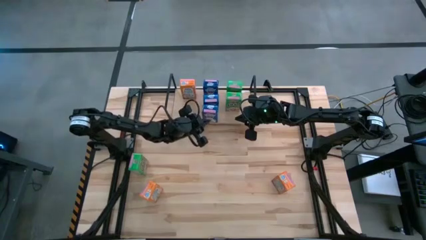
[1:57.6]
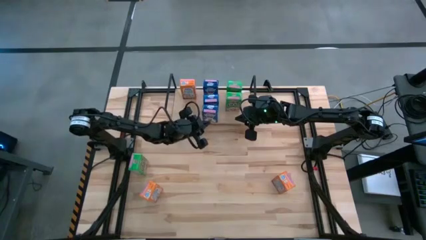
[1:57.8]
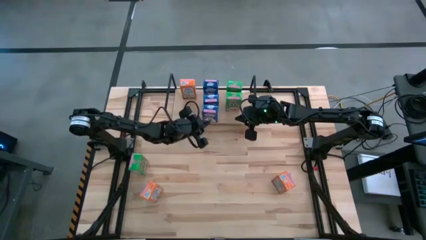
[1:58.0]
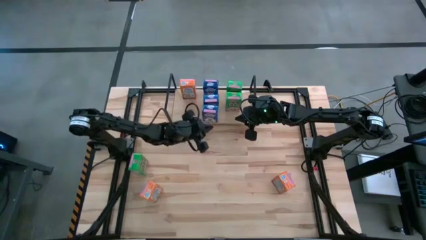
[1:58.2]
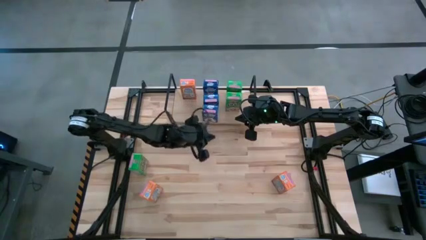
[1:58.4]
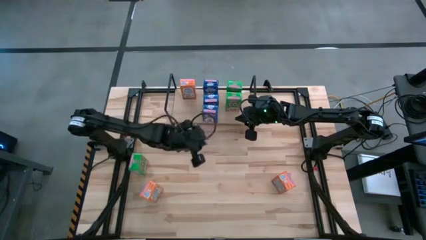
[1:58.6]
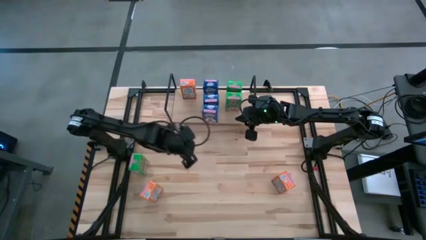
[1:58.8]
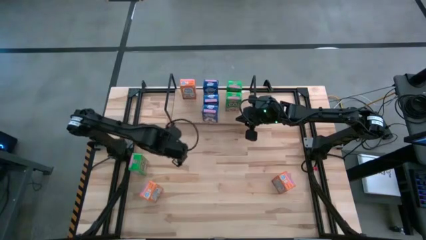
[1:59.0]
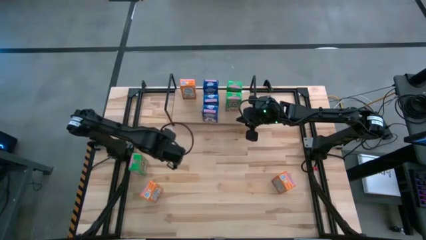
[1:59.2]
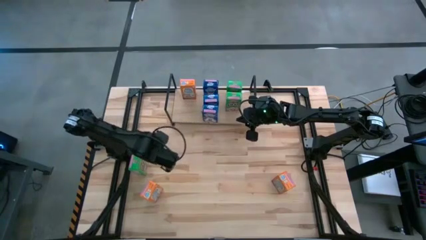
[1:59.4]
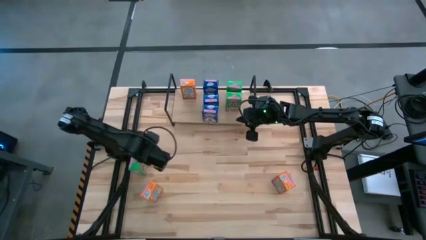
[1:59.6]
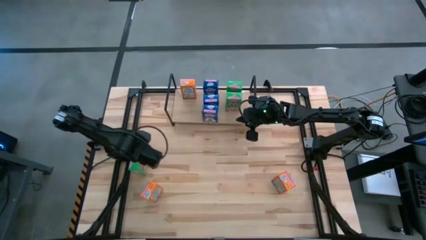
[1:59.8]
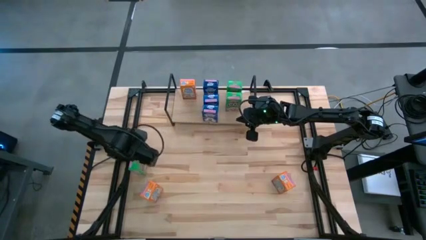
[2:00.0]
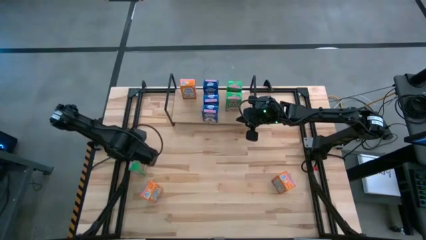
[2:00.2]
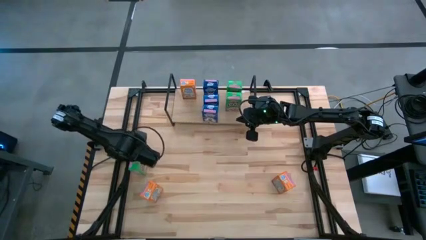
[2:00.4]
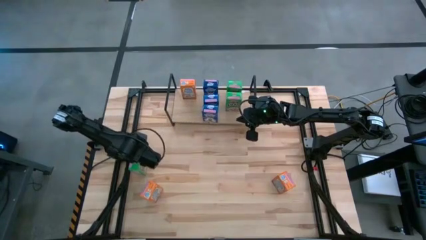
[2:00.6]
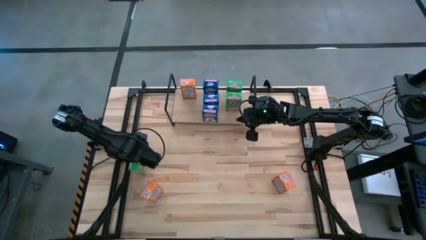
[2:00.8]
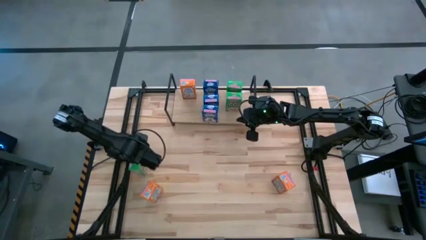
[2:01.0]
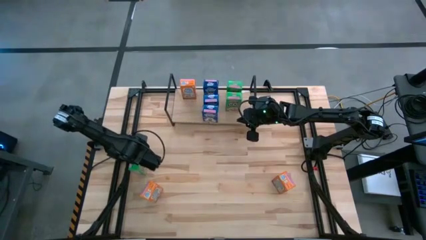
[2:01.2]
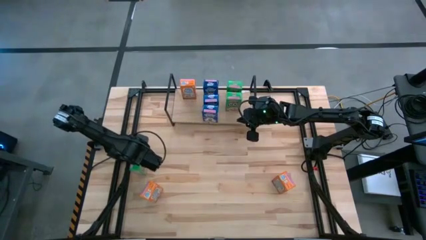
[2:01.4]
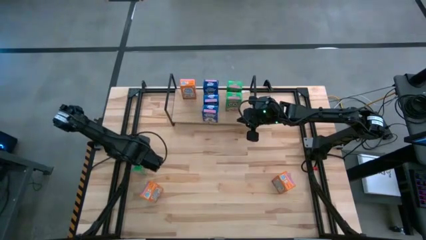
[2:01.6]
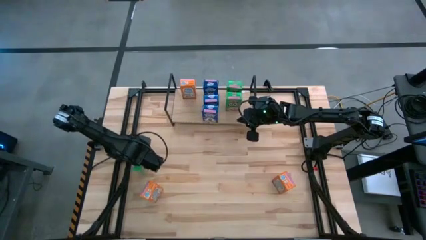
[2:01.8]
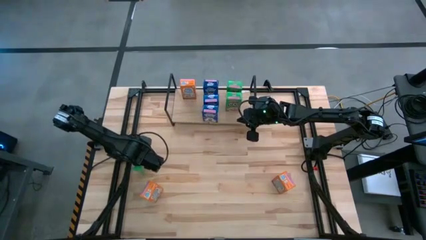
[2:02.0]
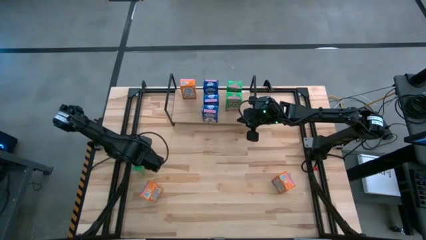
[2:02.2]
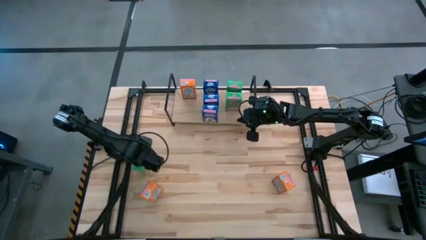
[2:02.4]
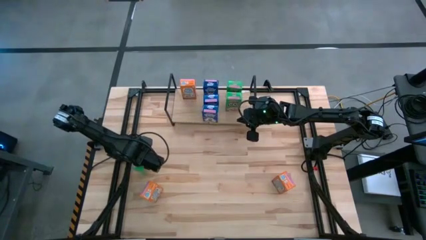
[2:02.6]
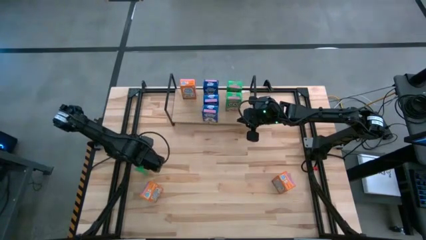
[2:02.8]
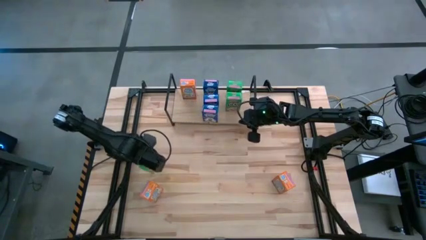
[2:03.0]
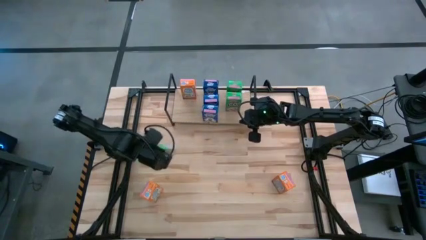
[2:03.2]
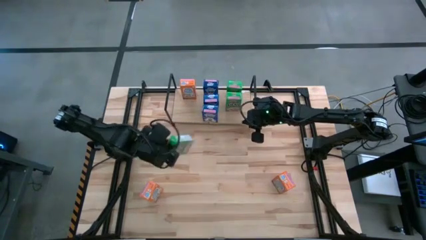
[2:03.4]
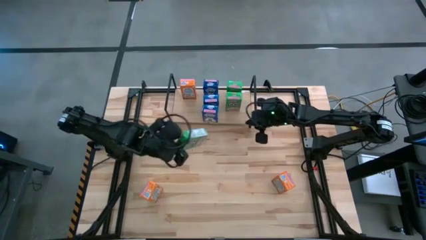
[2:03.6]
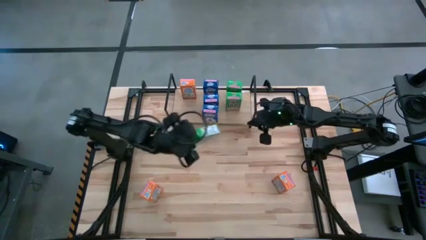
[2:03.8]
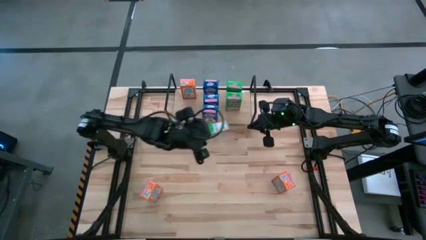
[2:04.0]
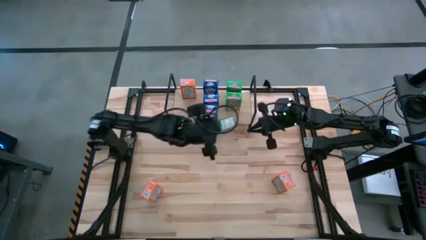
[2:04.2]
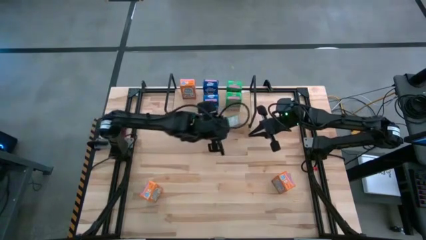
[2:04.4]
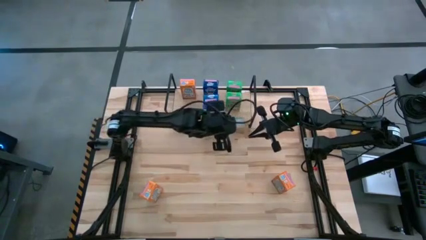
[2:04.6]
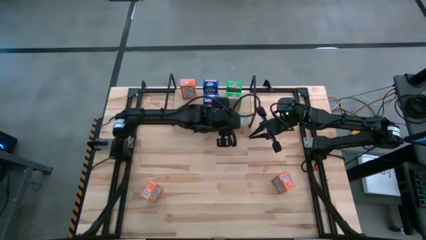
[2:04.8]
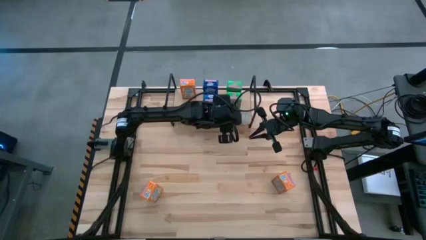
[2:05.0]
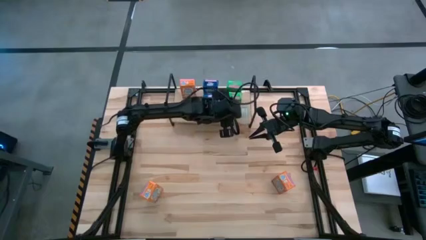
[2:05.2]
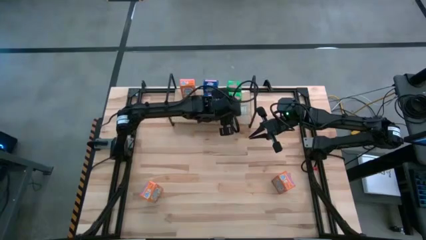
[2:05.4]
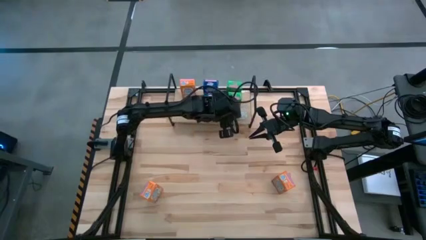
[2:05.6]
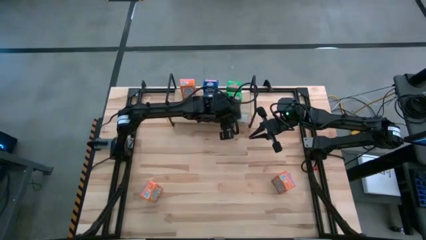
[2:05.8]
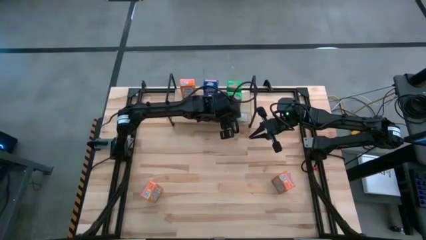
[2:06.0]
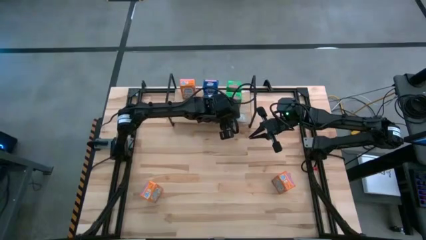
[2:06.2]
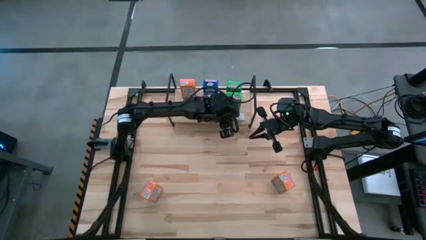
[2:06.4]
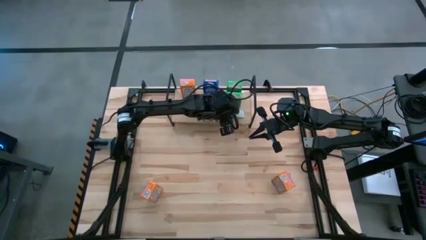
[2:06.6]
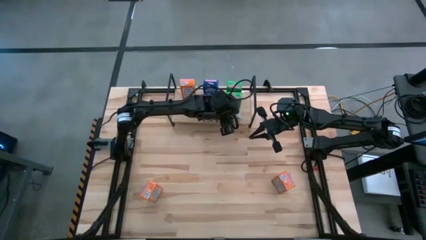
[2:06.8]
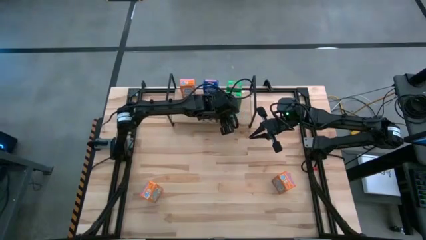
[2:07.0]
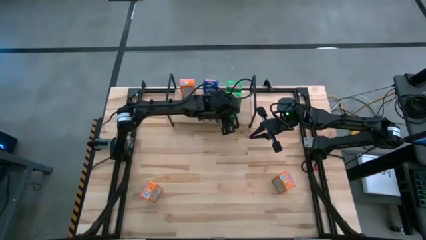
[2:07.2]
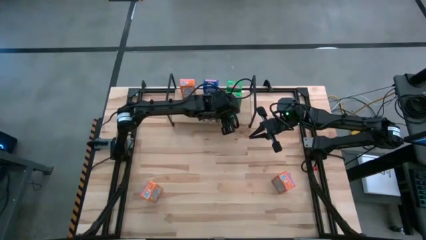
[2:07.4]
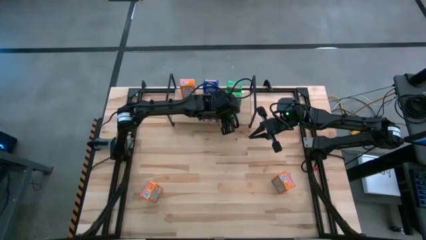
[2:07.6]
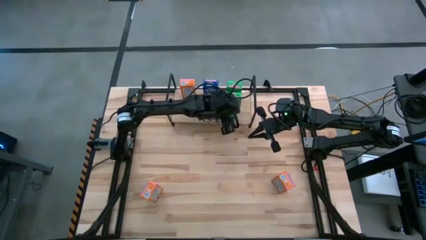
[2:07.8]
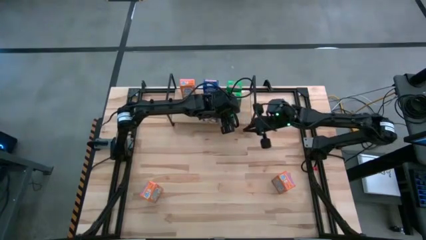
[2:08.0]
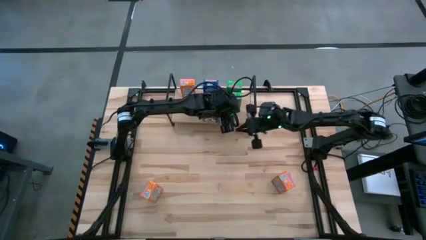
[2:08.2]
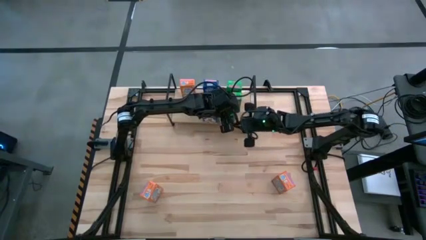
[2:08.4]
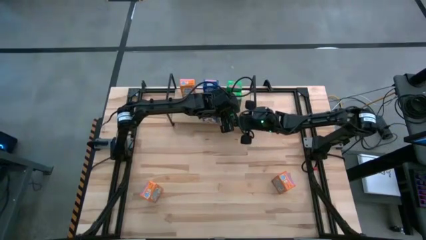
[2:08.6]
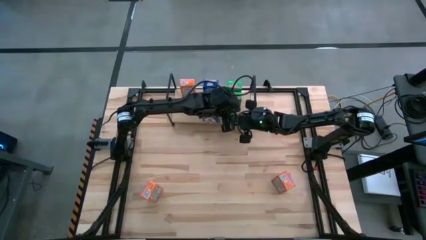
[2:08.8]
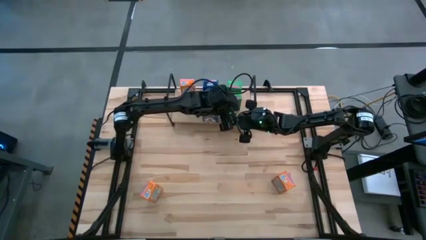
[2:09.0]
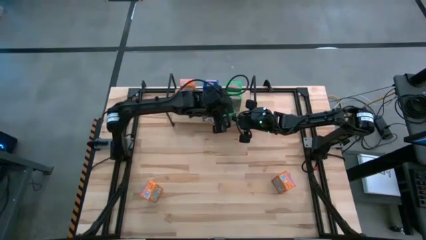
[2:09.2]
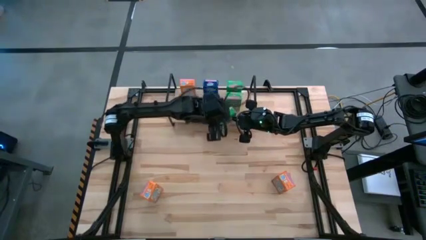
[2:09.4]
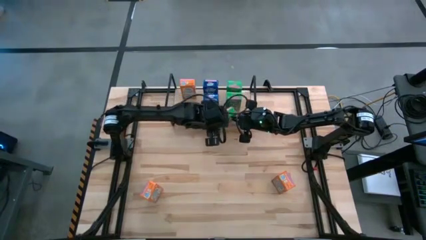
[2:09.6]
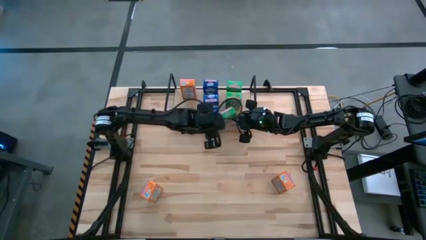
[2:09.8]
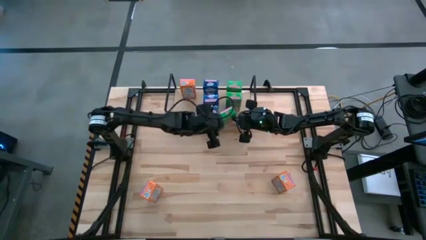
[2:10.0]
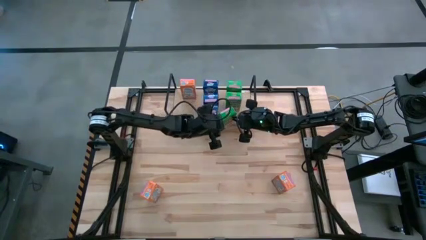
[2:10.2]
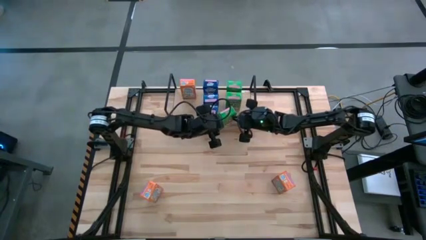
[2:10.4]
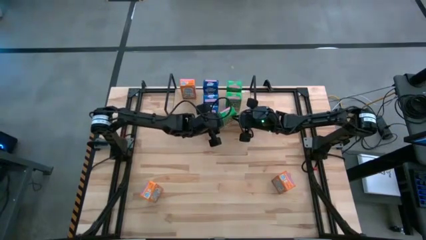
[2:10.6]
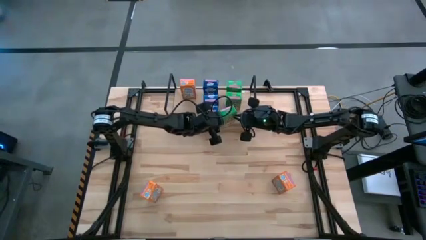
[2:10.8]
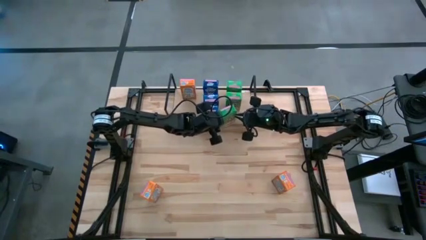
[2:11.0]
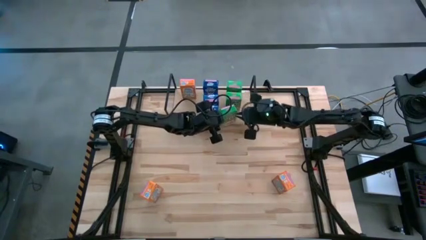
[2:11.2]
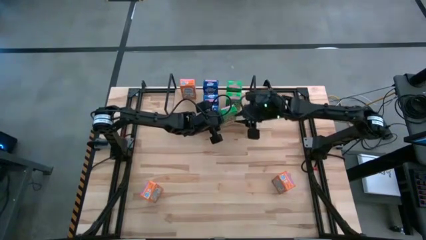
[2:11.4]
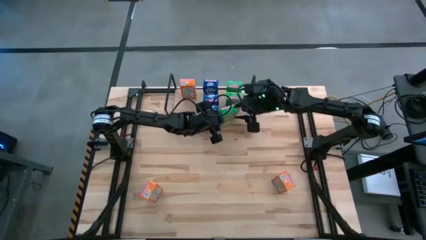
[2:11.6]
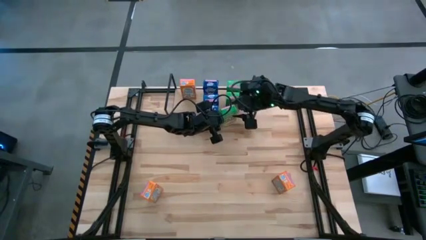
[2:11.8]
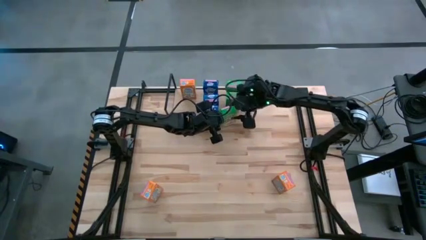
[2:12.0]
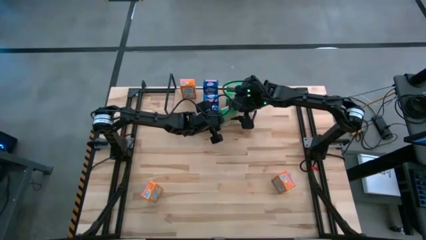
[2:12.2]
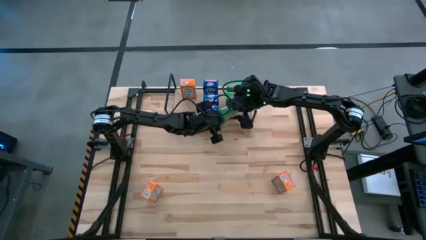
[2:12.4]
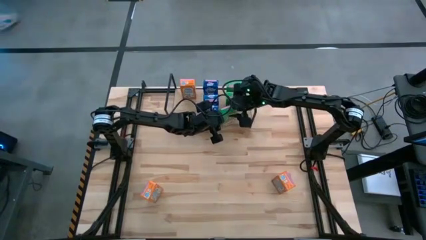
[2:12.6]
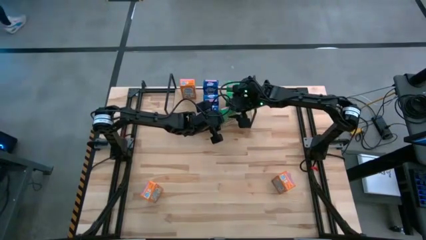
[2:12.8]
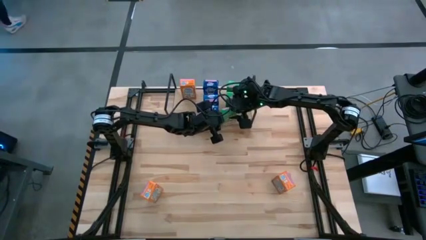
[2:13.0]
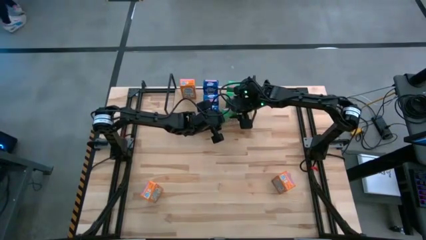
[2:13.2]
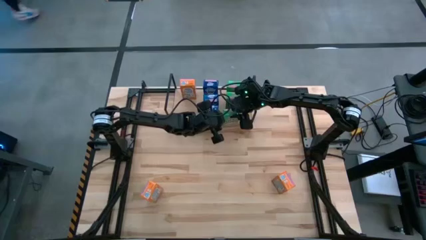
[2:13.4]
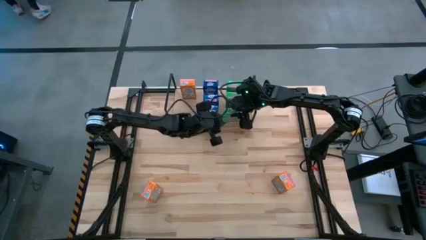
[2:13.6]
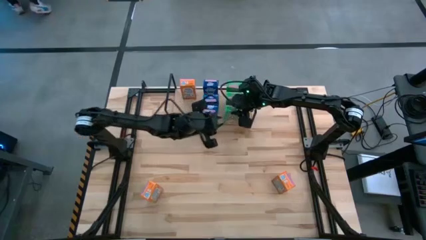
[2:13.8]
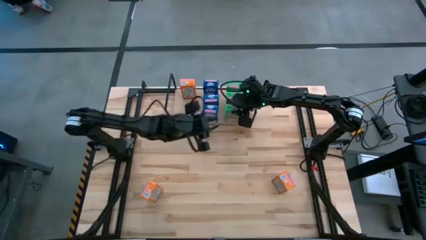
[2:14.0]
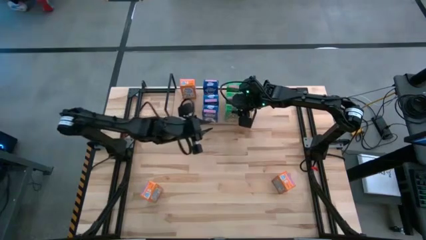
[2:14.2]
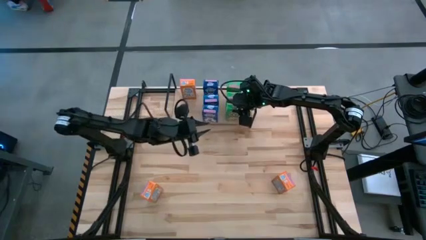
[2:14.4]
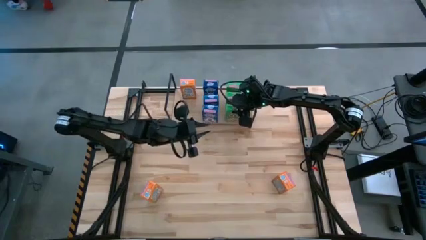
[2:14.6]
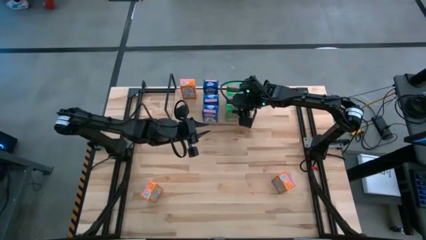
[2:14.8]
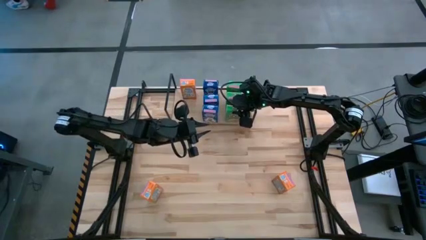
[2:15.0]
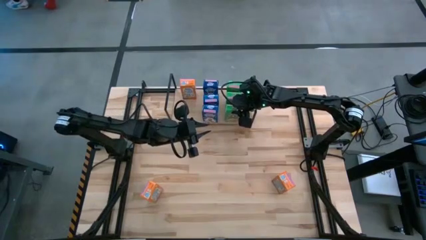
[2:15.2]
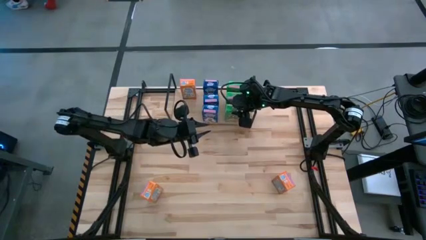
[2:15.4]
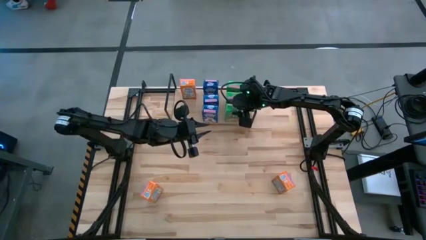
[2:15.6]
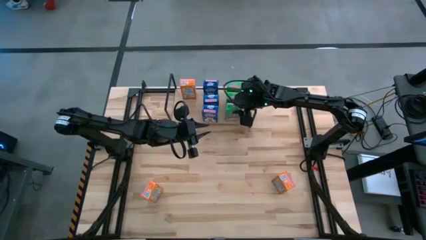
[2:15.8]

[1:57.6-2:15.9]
Task: Stack cereal on shelf
Put the green cereal box aligned with the green cereal box on the shelf
